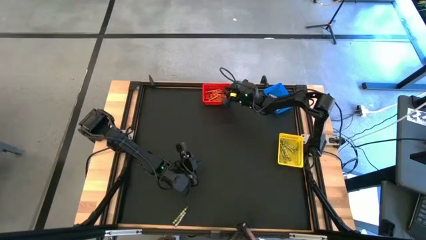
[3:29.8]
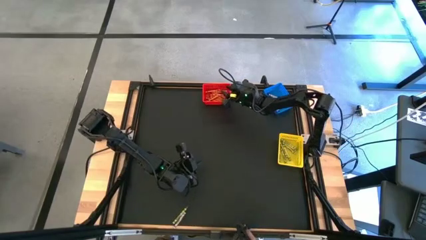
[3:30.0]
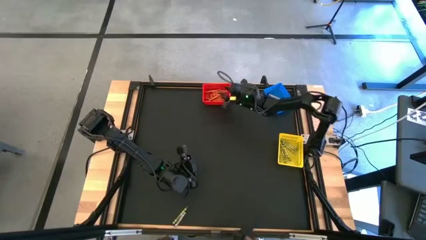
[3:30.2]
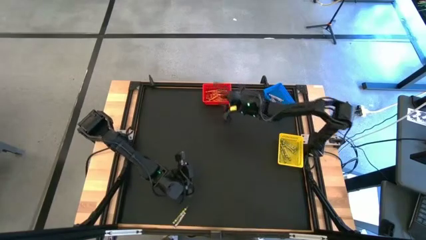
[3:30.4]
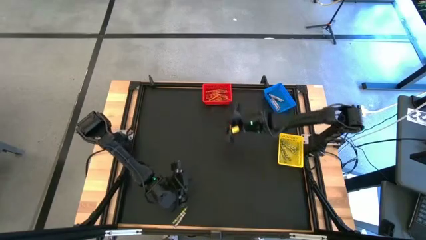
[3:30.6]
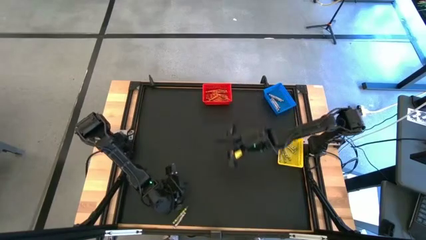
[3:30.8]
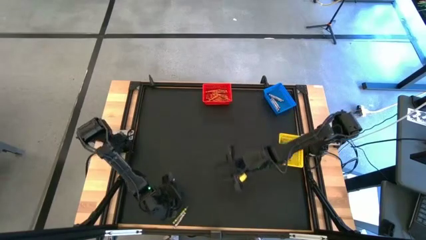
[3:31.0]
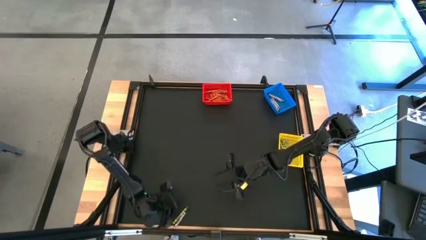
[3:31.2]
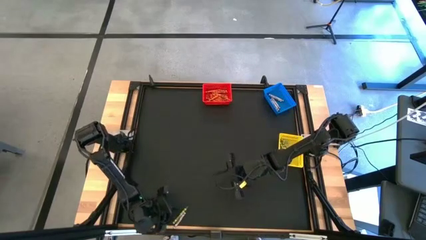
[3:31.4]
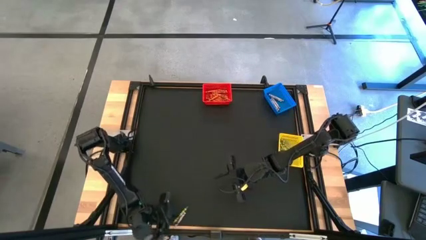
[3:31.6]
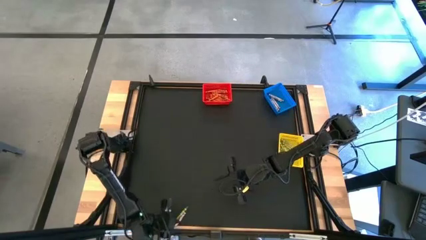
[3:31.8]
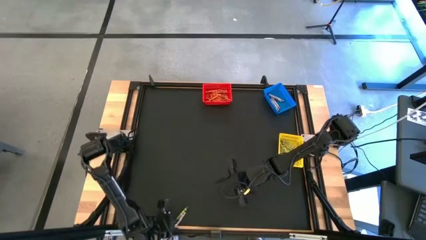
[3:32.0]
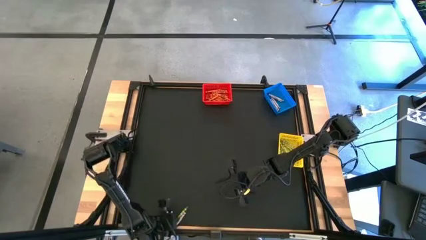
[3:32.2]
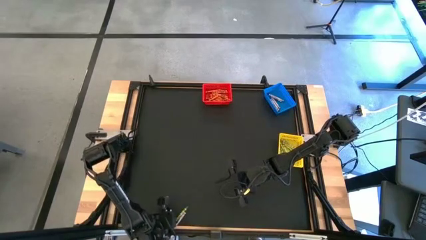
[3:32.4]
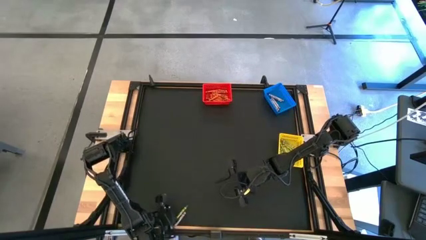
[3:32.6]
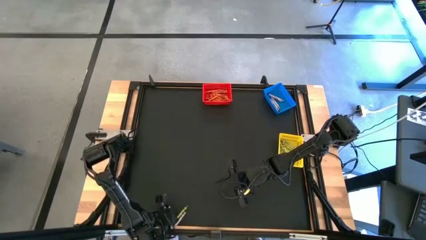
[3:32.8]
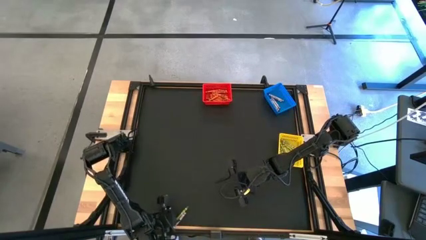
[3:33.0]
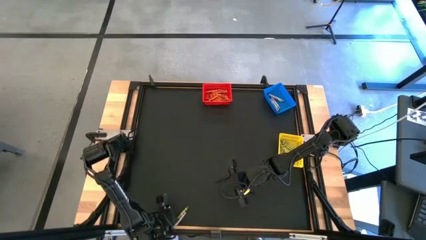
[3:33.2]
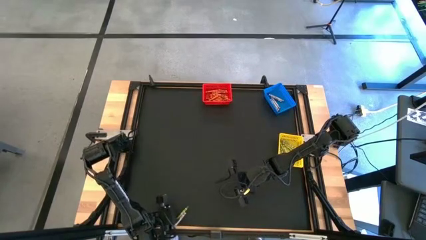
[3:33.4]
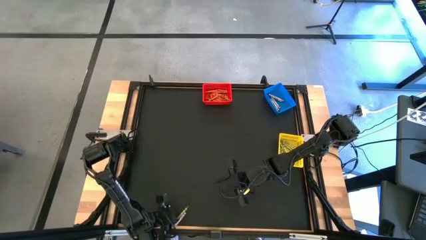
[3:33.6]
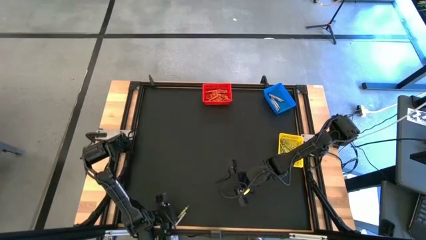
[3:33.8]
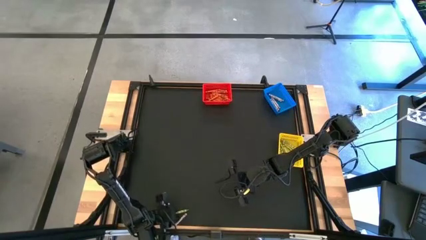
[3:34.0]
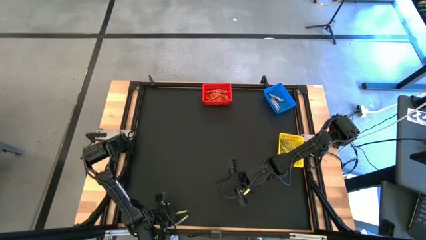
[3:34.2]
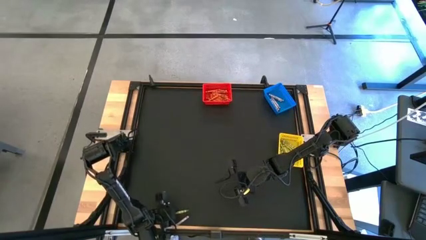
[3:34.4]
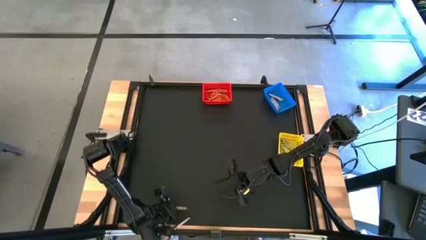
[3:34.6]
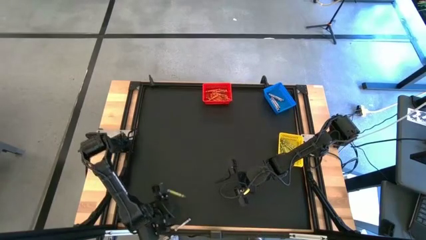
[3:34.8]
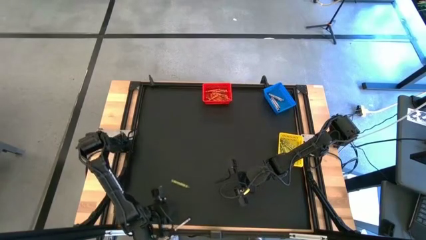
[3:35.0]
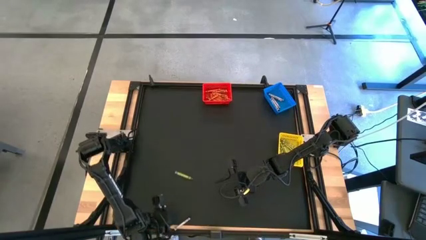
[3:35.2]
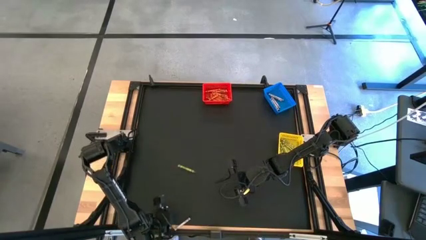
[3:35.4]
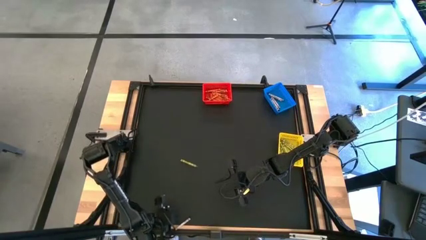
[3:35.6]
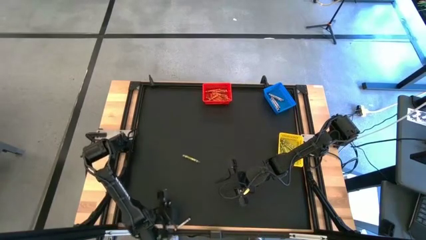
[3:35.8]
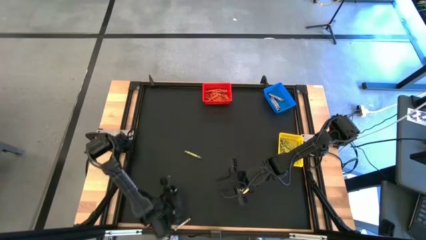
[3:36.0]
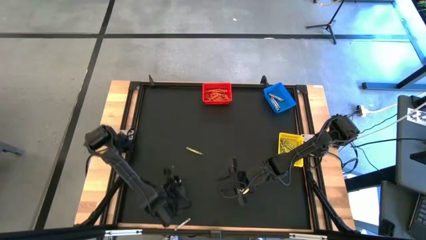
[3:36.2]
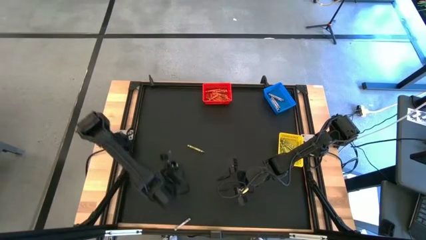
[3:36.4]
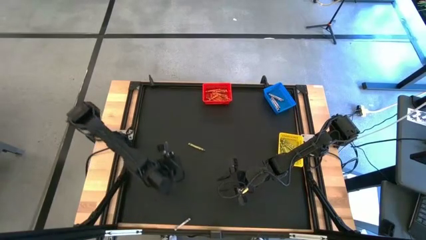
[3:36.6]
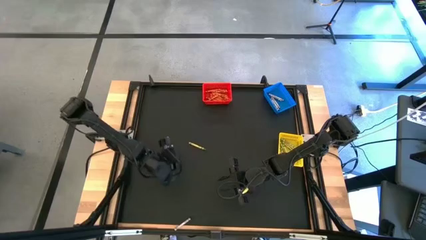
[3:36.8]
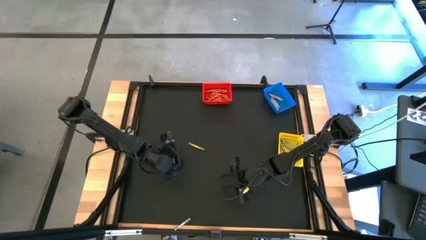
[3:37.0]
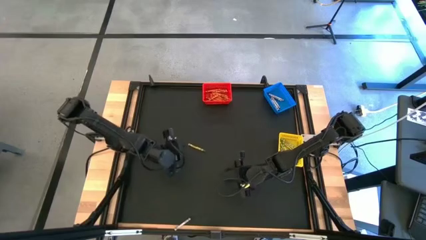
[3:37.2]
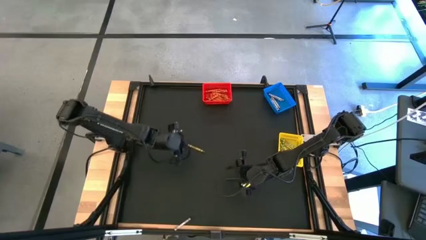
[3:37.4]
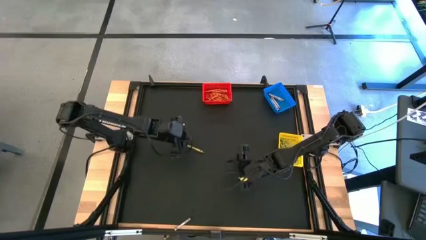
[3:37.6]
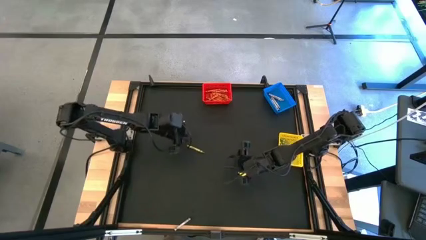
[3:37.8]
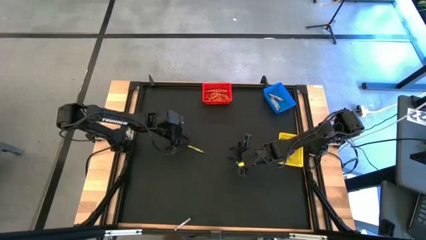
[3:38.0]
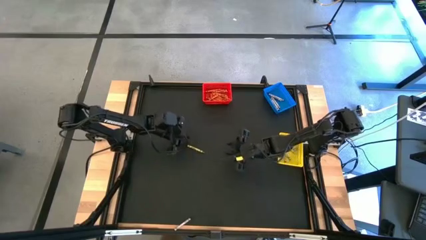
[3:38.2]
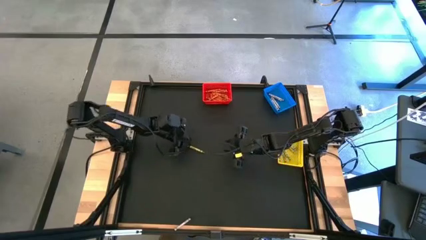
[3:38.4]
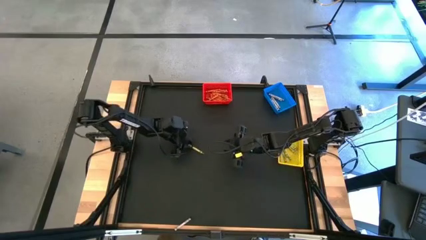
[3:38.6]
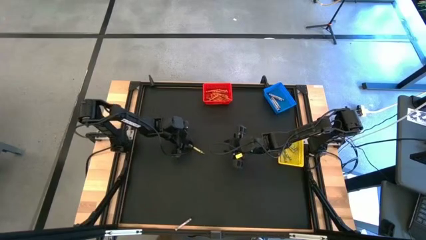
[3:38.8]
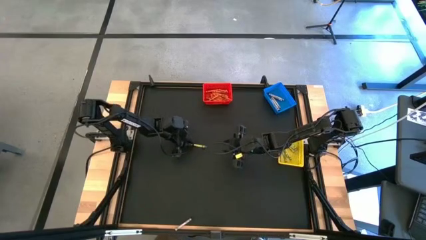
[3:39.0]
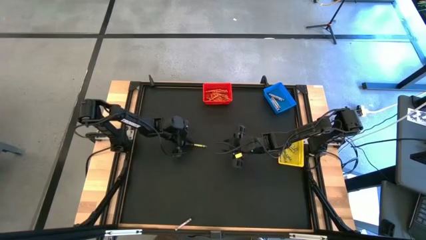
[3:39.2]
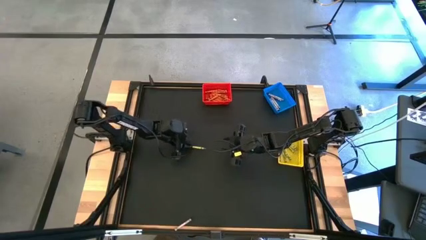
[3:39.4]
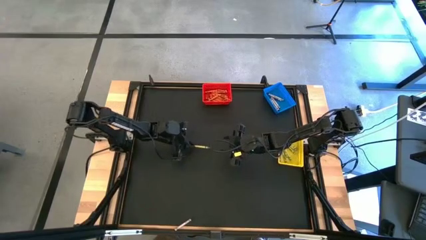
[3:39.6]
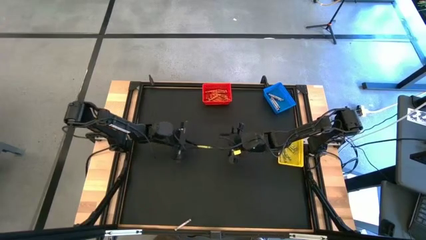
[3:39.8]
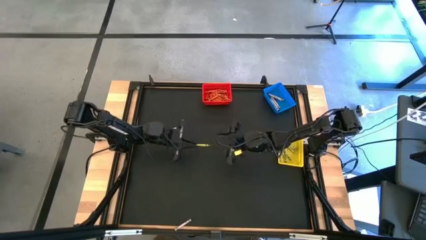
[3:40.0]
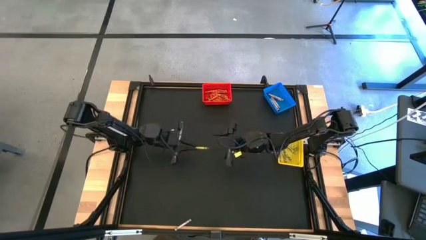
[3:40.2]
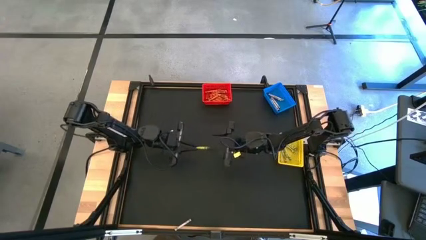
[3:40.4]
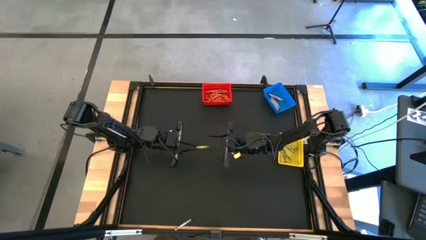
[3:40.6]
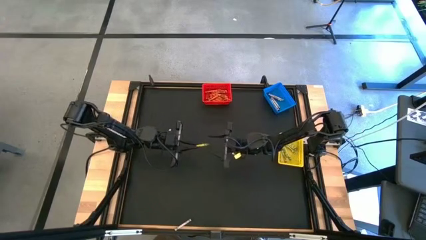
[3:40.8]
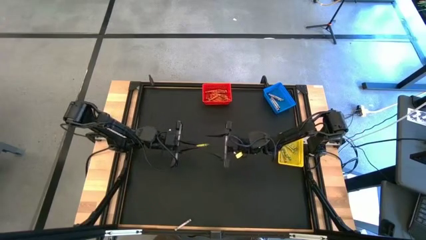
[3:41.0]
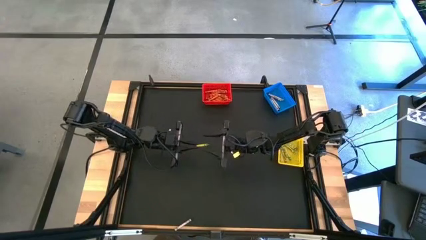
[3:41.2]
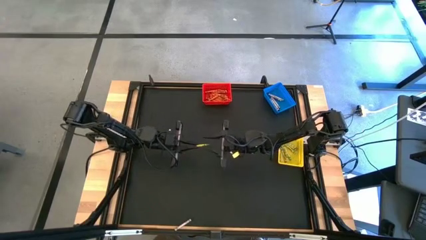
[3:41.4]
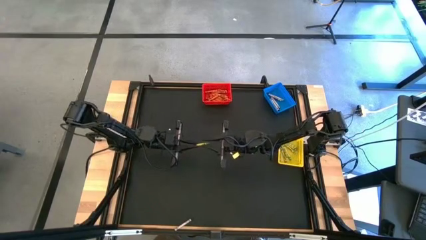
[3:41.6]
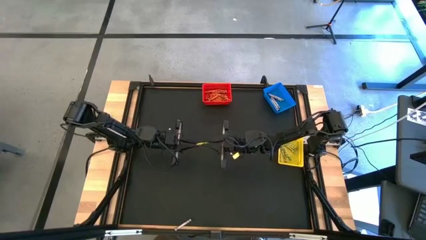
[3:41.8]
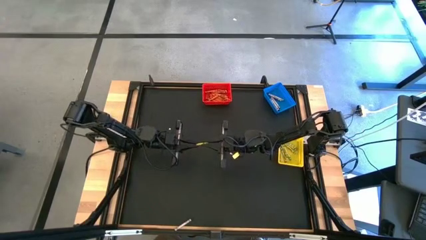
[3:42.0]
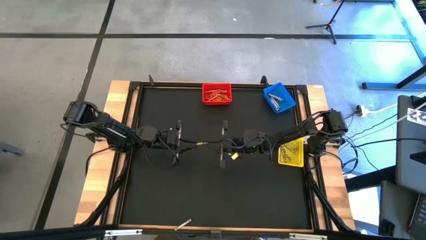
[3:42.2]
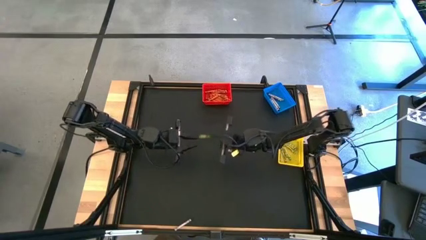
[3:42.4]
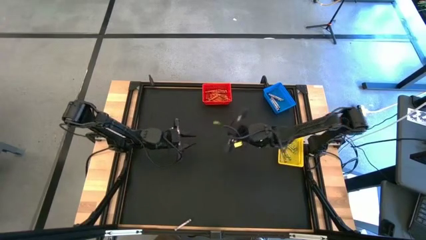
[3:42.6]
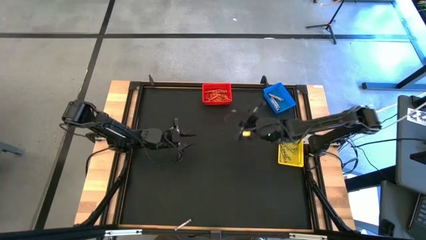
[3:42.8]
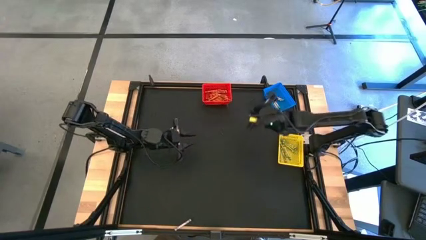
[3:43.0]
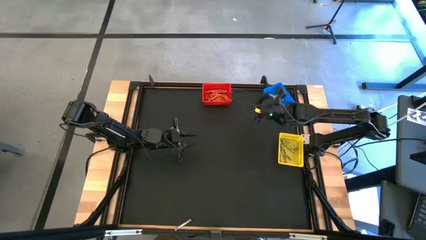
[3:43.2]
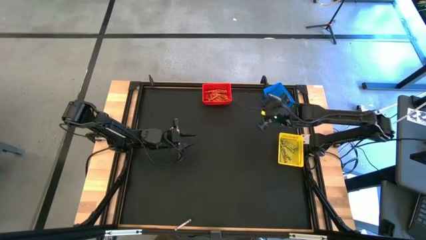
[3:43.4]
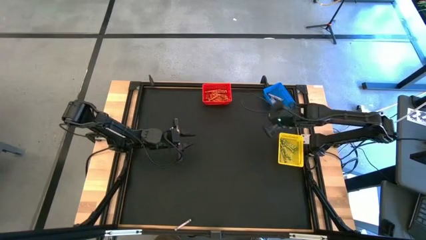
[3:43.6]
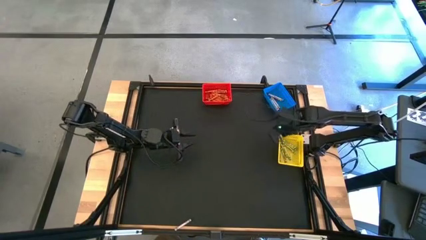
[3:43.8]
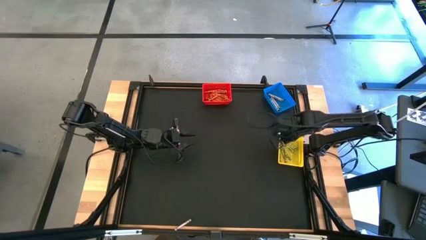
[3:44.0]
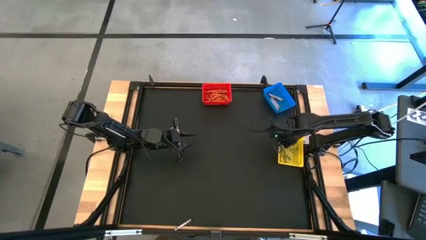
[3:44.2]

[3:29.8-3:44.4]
Task: Sort crayons
Put the green crayon into the yellow bin

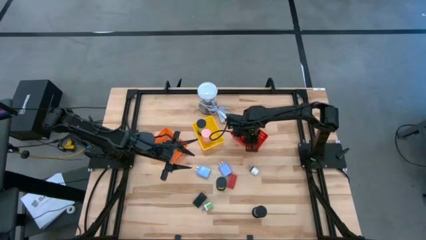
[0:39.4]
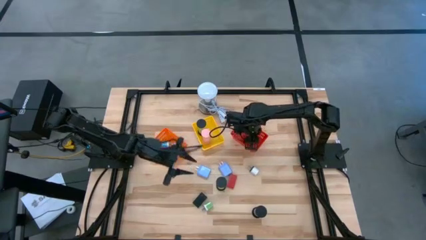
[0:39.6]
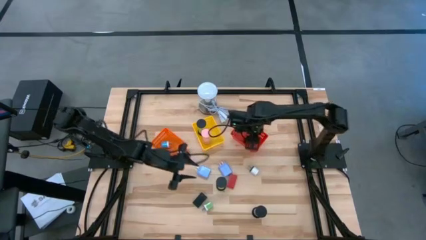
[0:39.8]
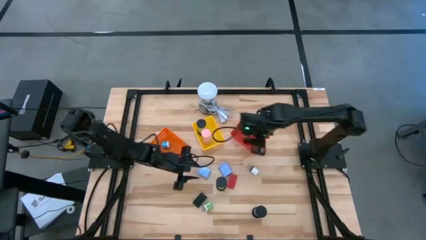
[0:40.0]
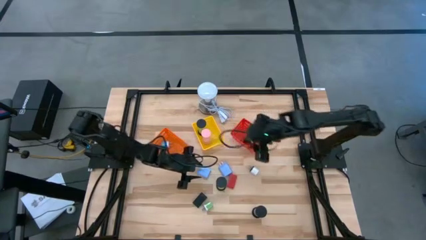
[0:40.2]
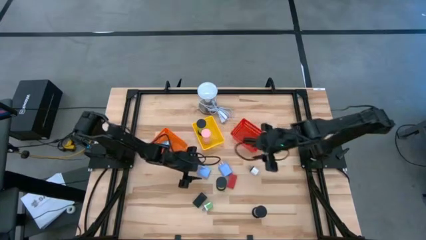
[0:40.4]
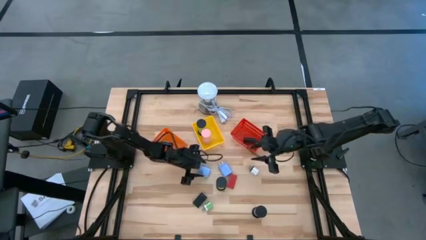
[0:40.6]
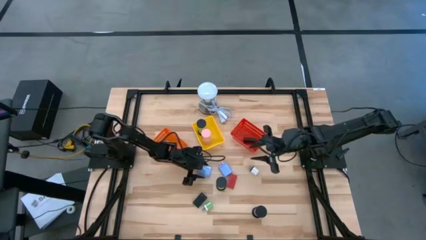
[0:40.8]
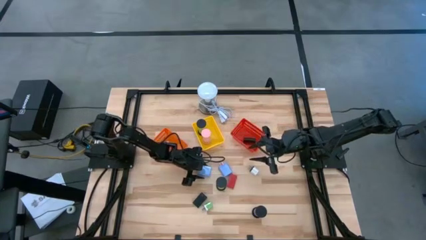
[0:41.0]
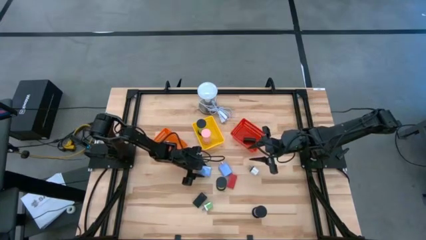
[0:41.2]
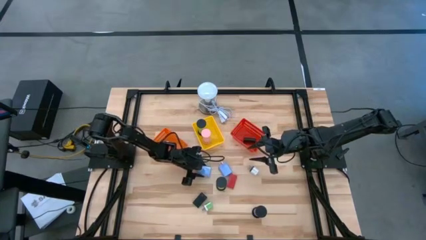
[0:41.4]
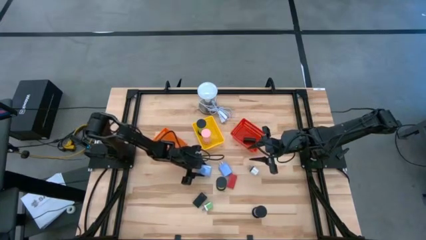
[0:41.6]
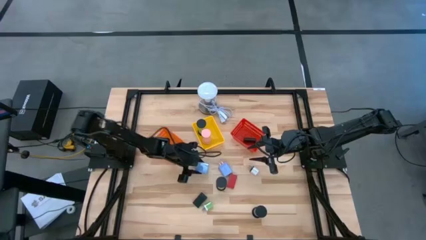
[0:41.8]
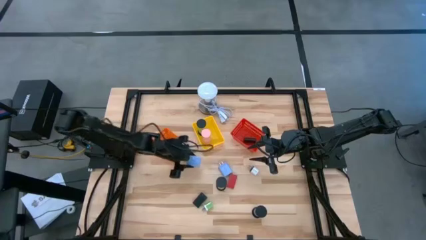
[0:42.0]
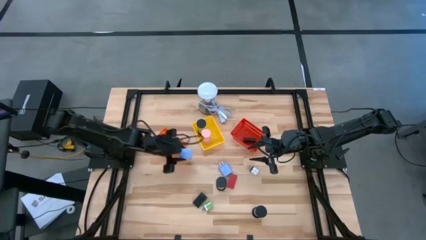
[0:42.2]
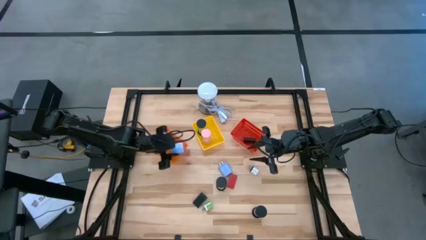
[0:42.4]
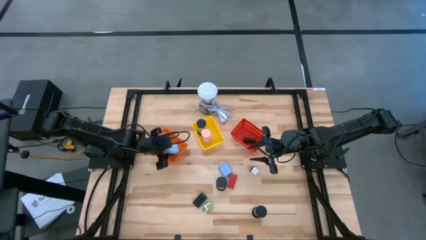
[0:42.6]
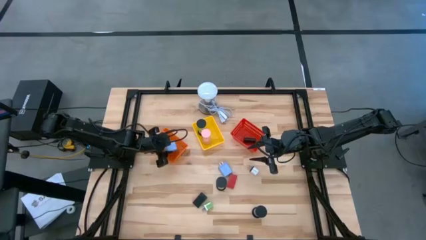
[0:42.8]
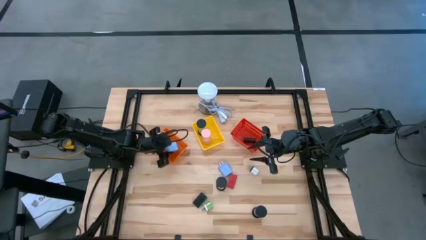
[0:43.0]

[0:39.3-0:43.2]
Task: Pick & Place Office items
Put the left large blue charger adapter into the orange basket
